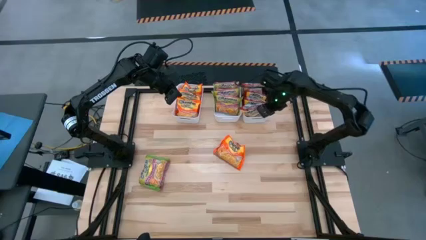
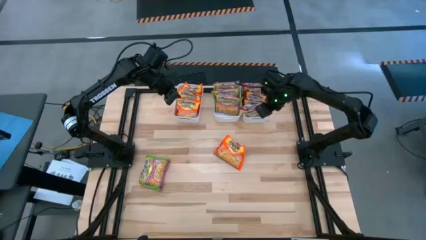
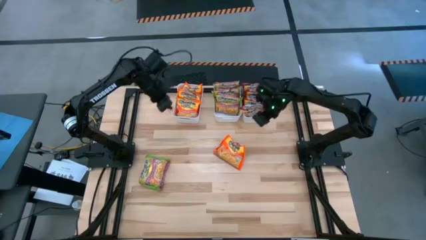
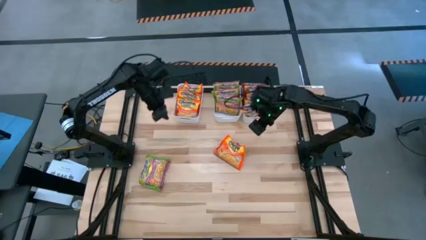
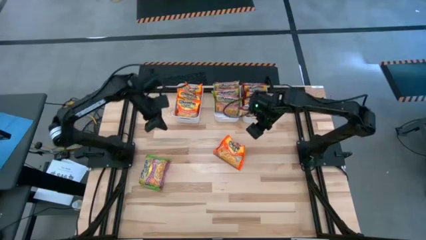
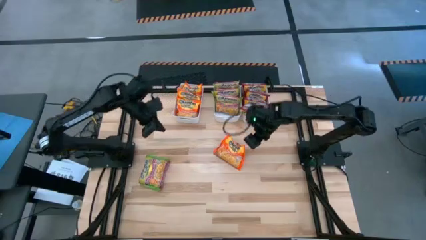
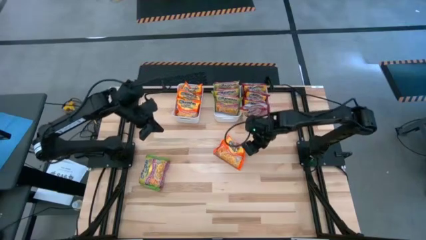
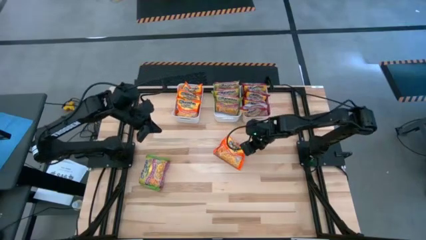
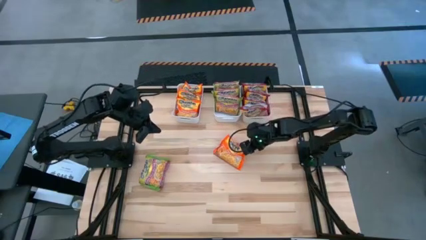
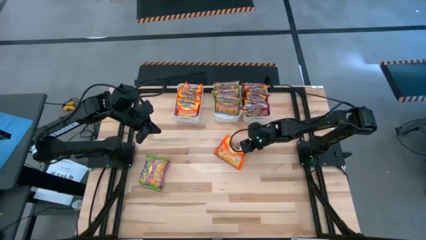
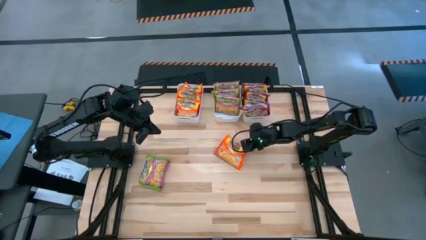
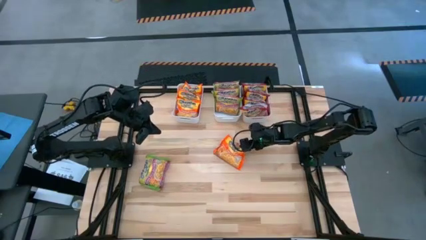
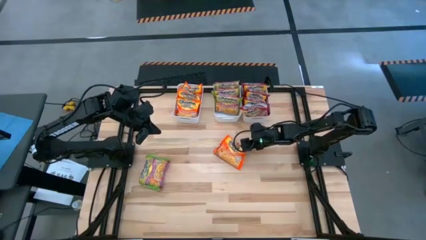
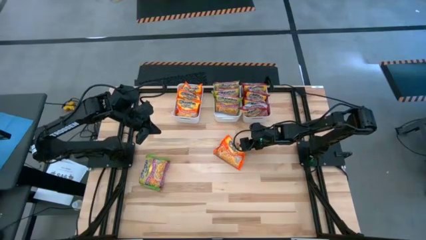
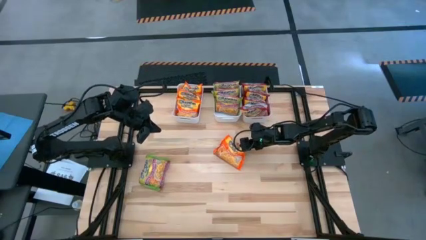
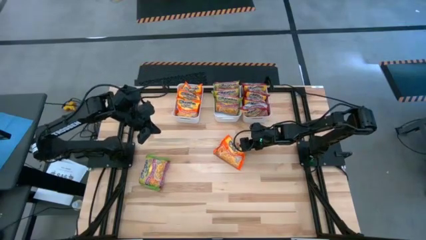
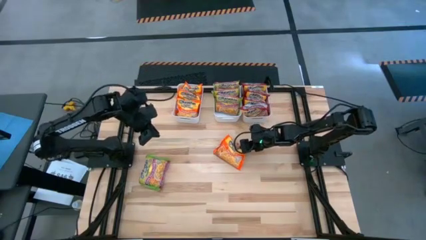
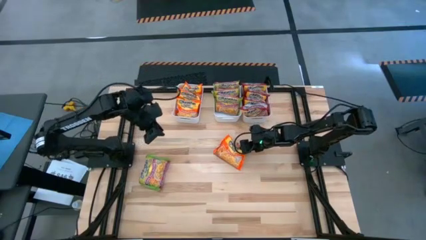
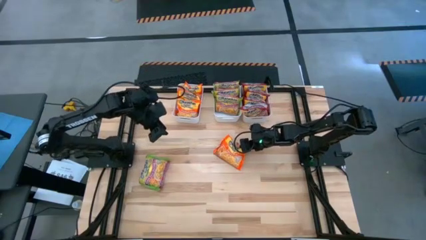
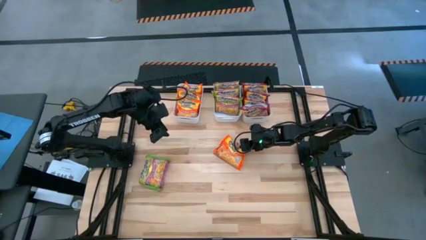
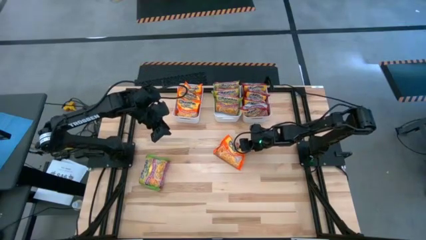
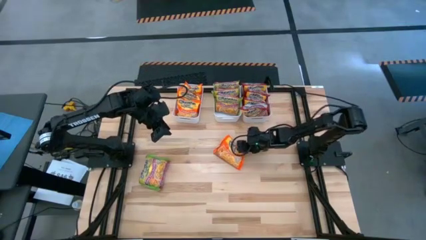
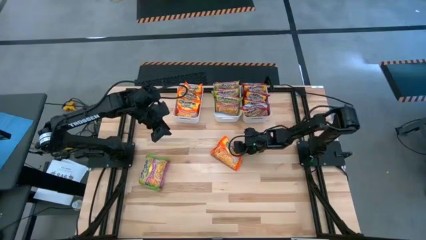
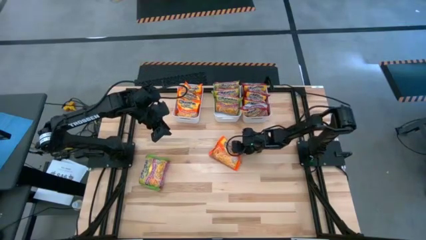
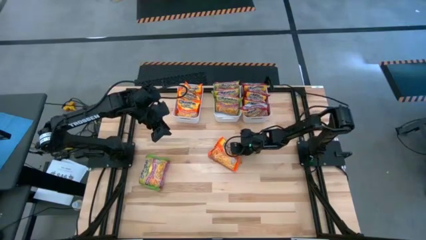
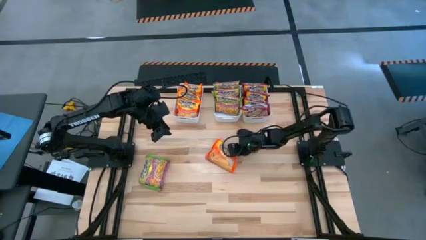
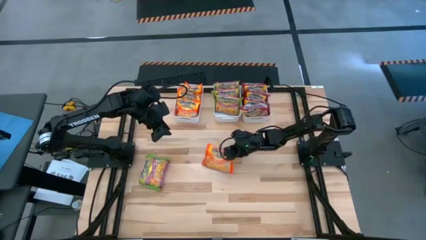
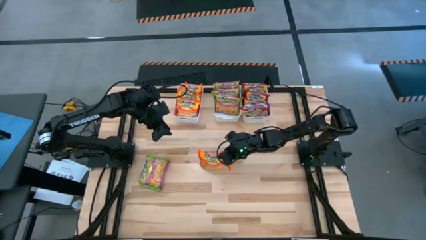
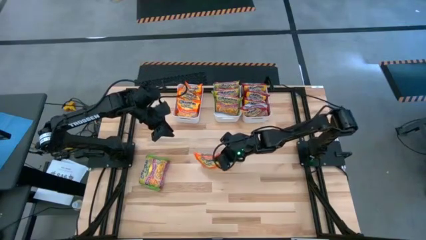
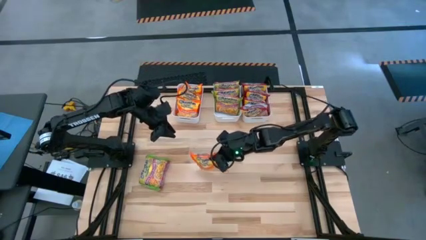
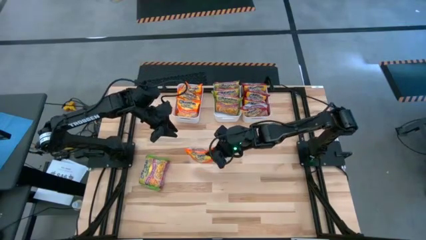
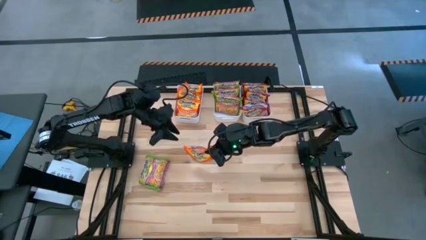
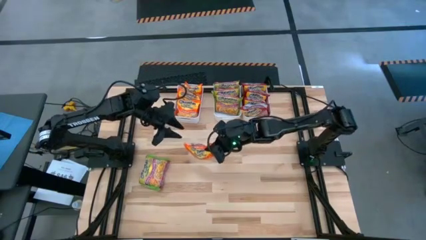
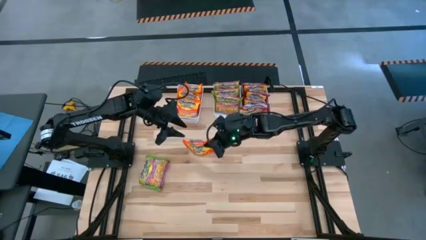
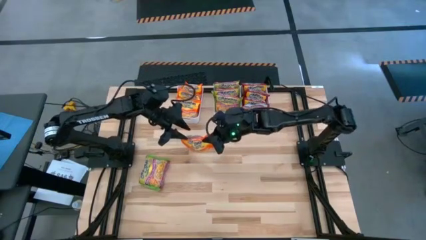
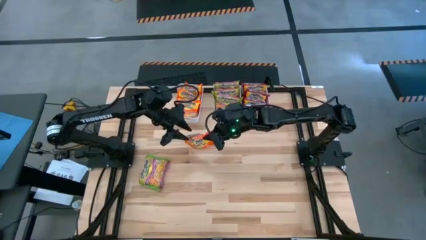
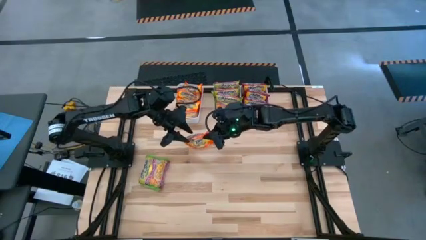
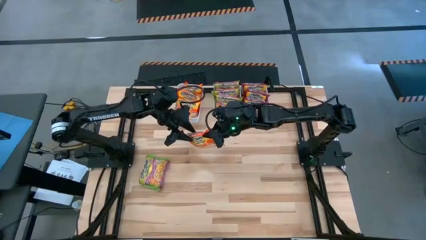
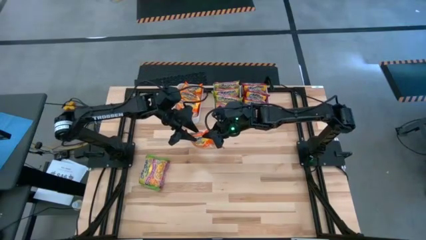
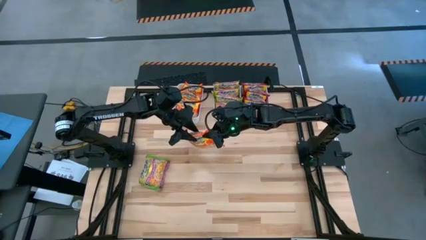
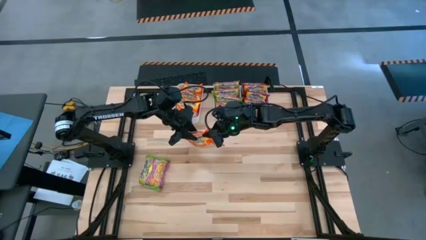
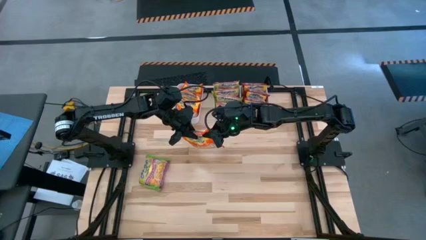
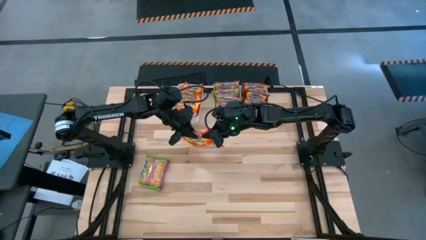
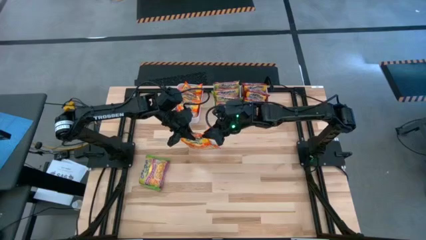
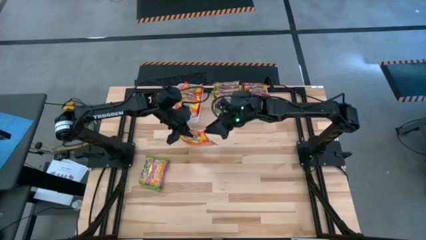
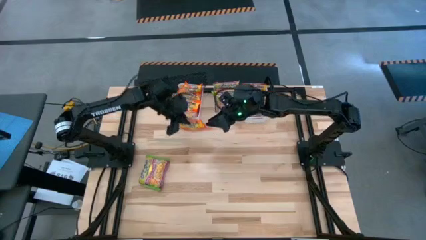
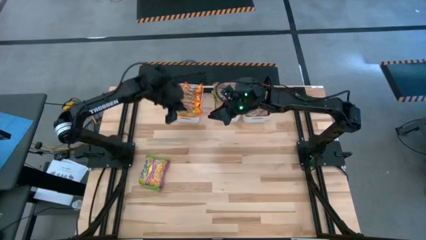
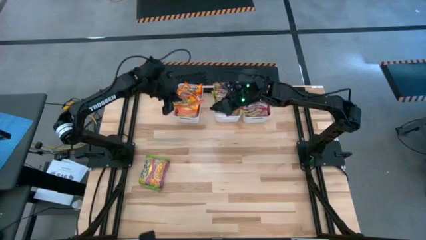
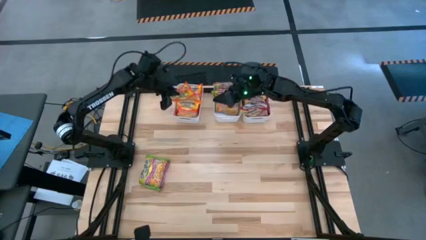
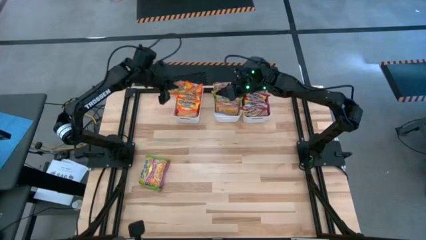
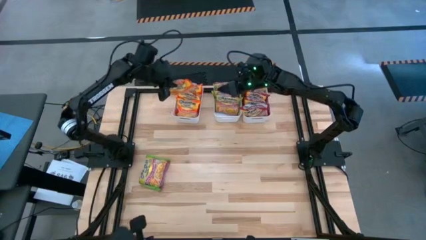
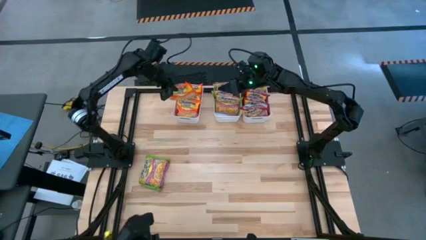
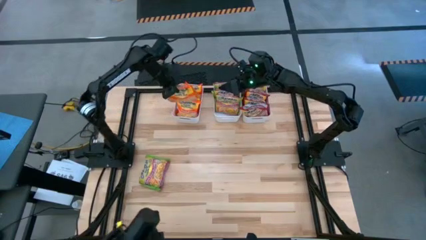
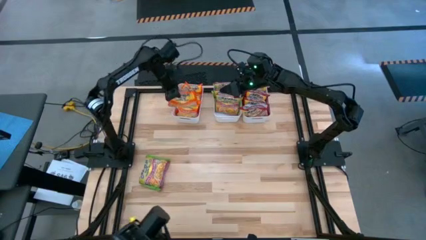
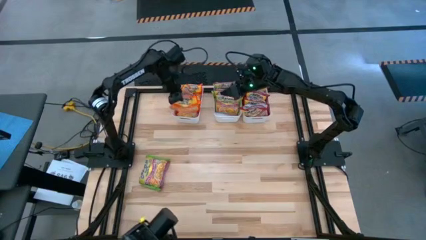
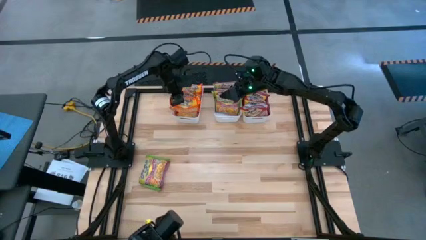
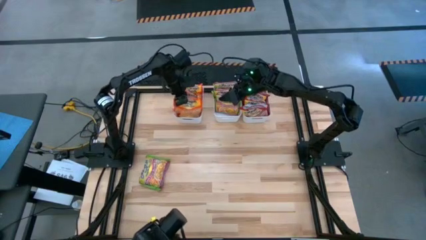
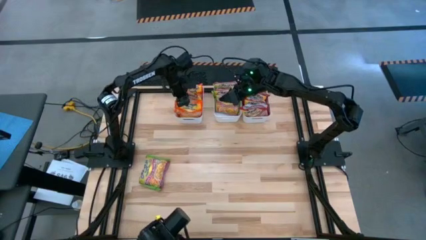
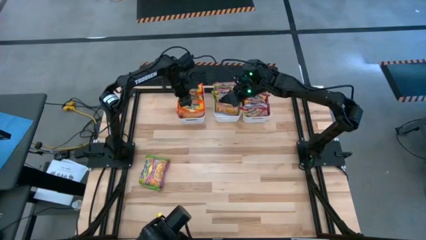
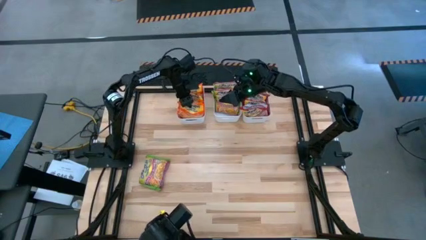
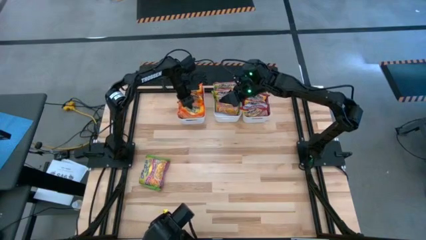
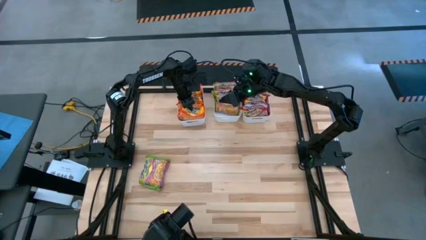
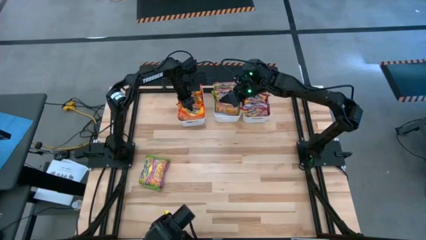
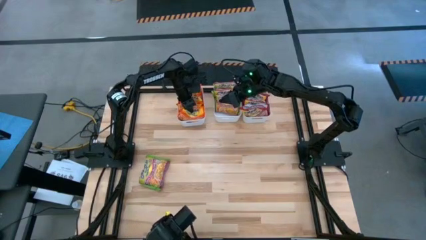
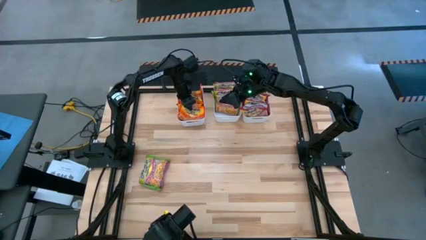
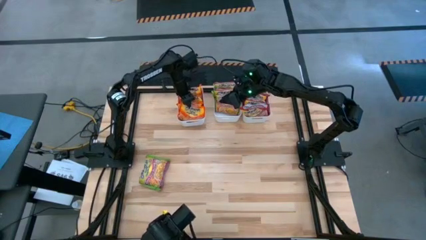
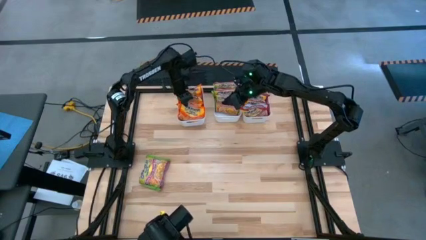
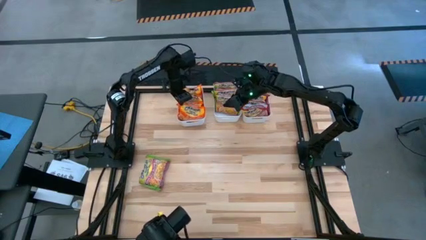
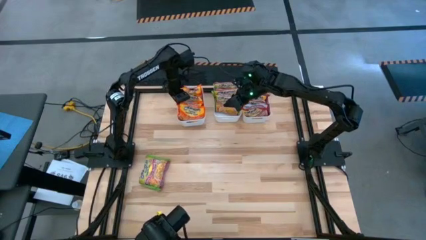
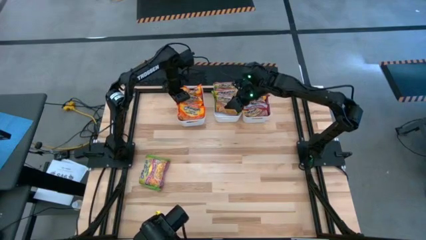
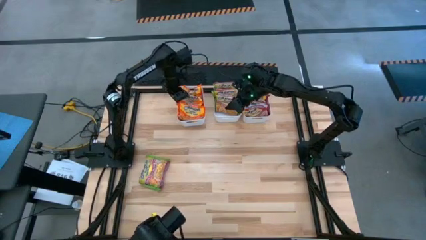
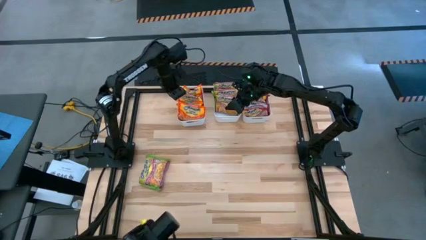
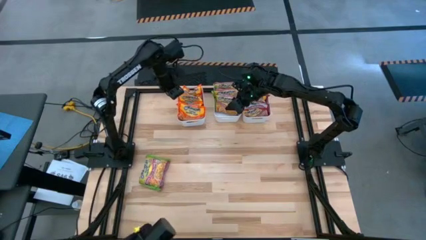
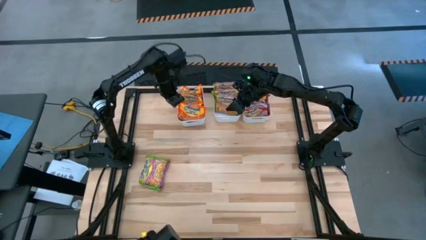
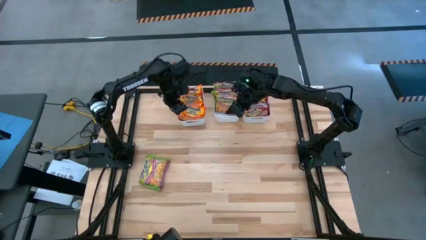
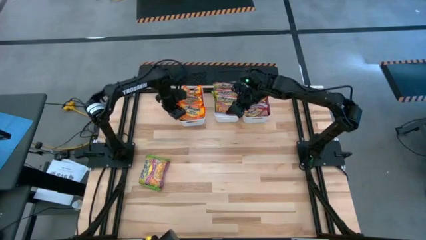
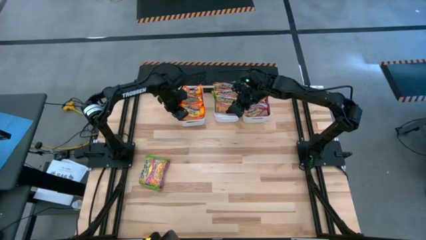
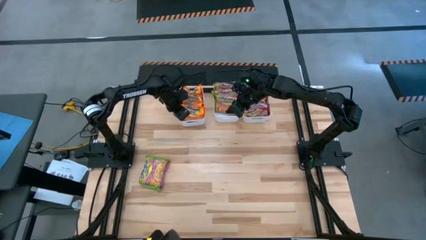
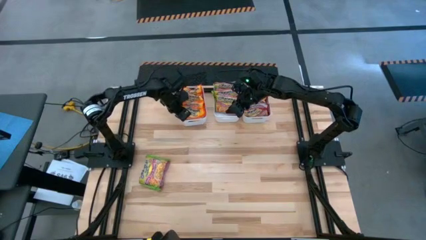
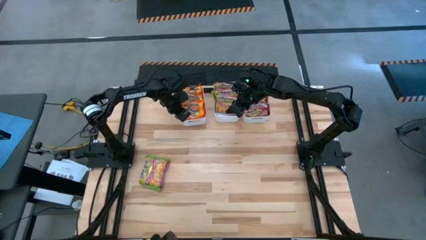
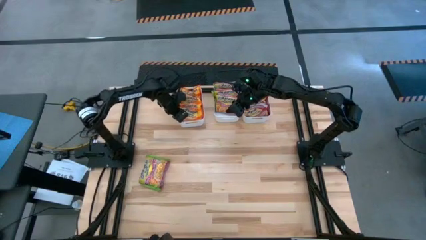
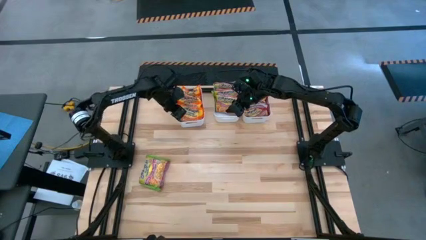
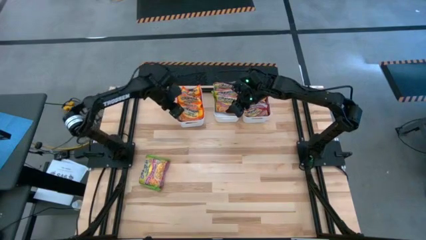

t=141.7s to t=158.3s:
Task: Sort Maruchan noodles
Put the orange noodle pack into the left white bin
